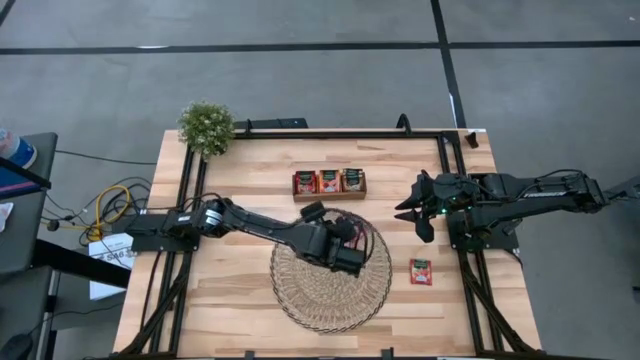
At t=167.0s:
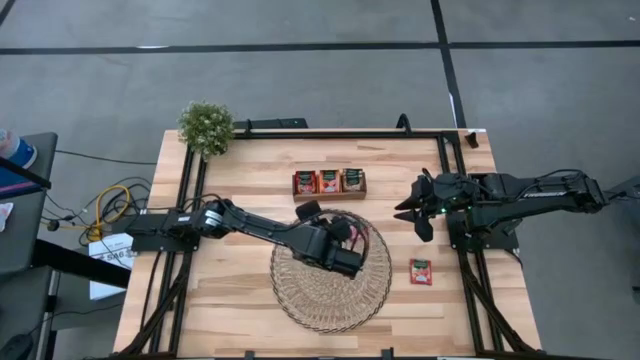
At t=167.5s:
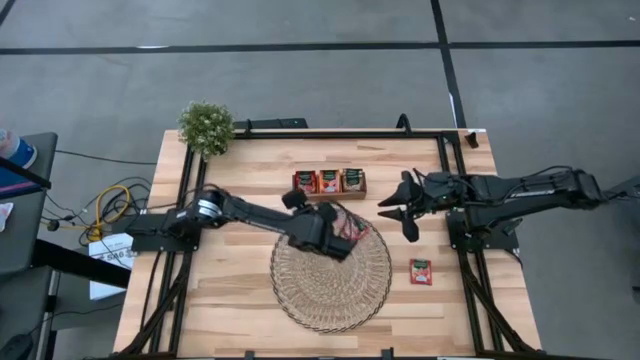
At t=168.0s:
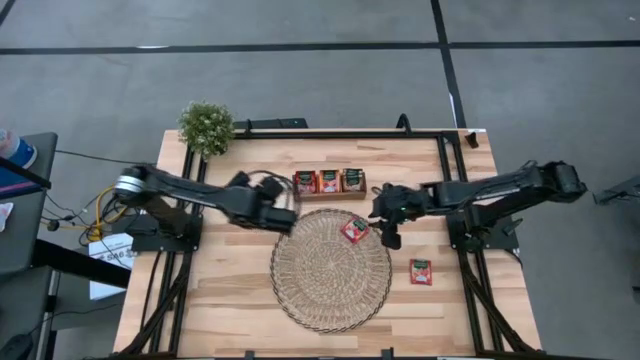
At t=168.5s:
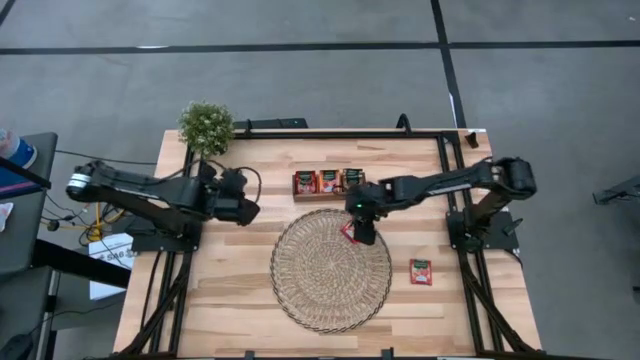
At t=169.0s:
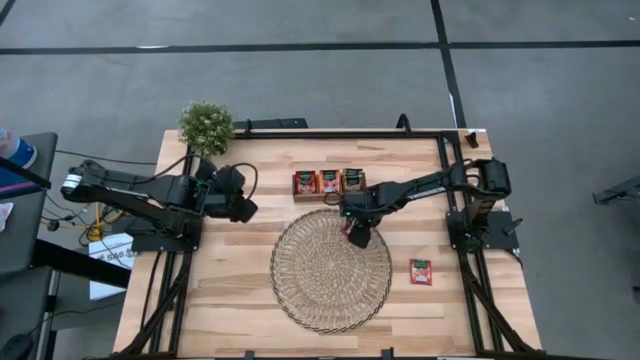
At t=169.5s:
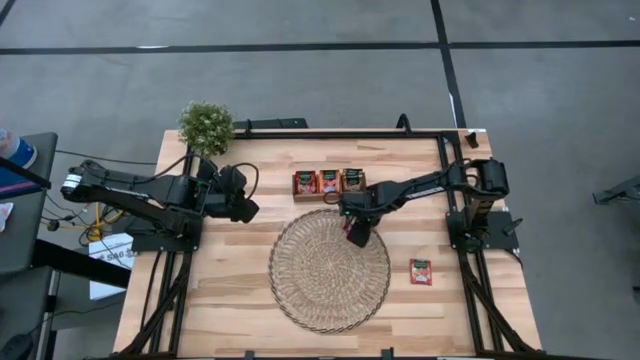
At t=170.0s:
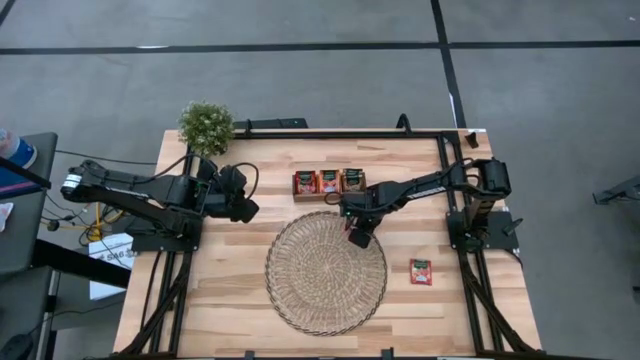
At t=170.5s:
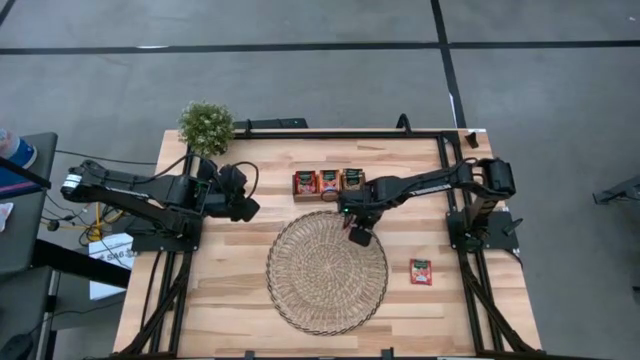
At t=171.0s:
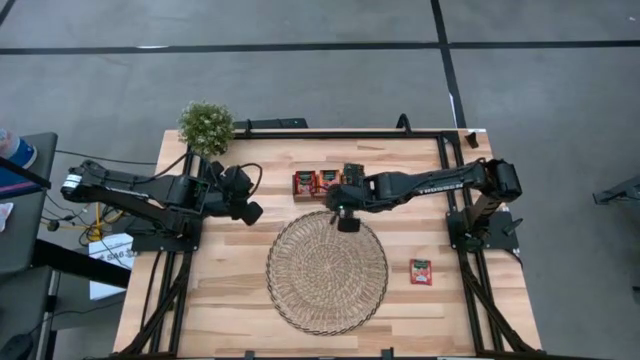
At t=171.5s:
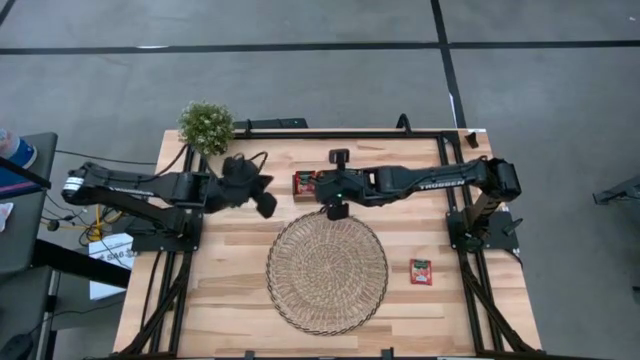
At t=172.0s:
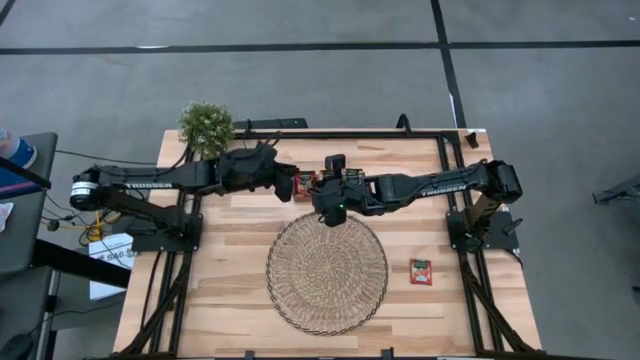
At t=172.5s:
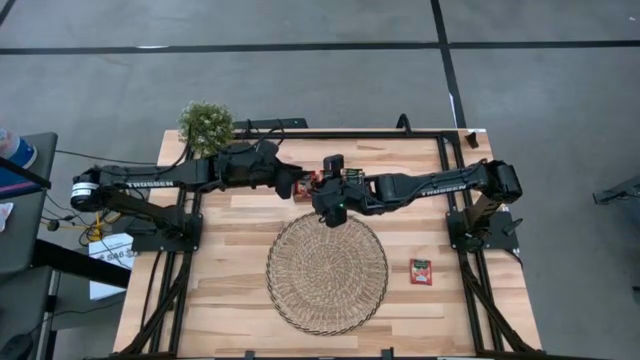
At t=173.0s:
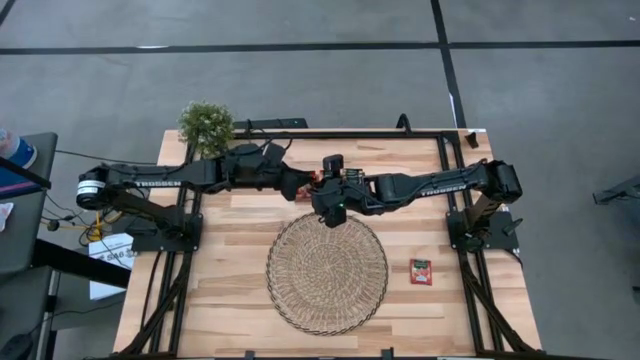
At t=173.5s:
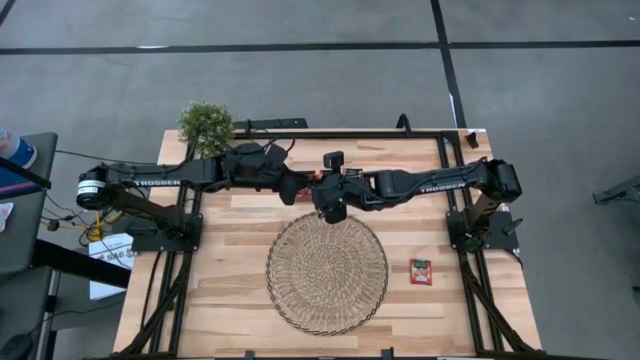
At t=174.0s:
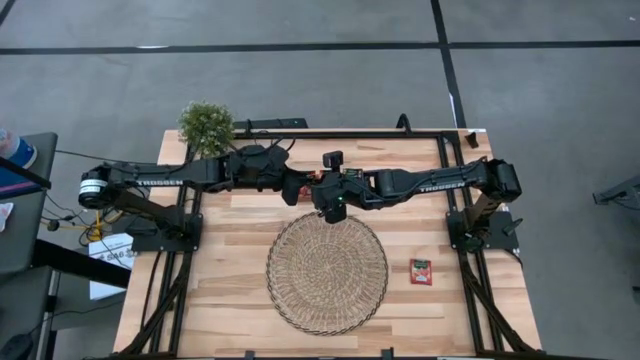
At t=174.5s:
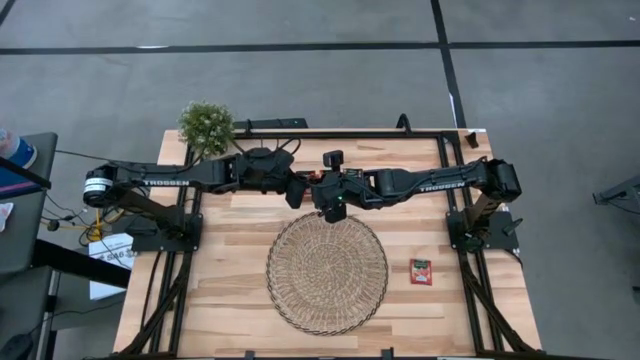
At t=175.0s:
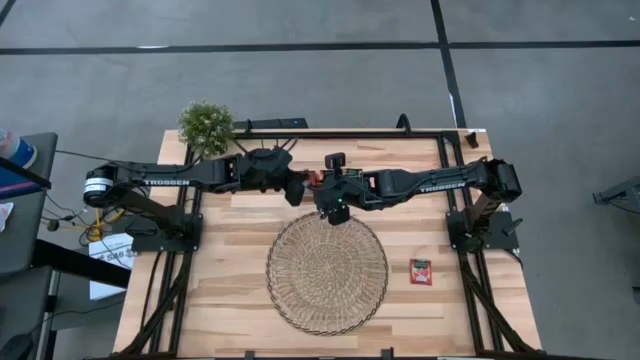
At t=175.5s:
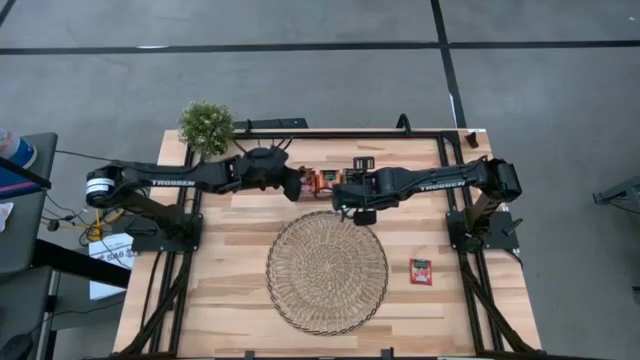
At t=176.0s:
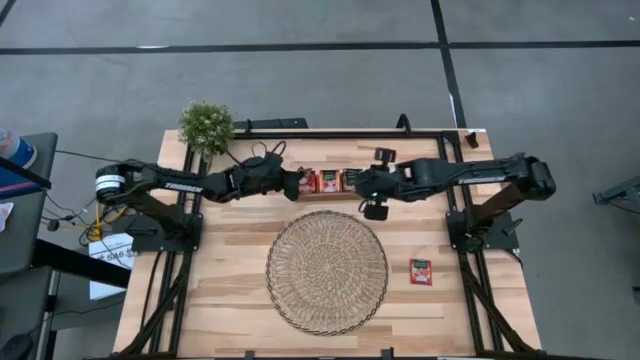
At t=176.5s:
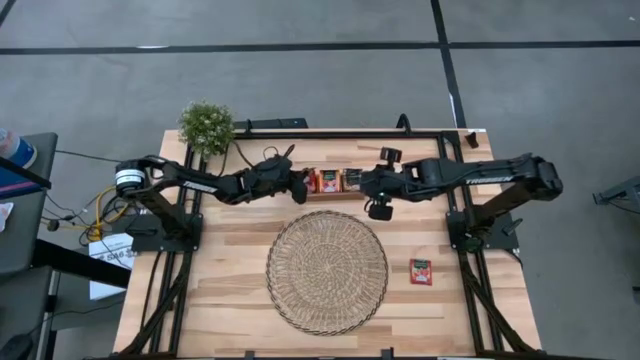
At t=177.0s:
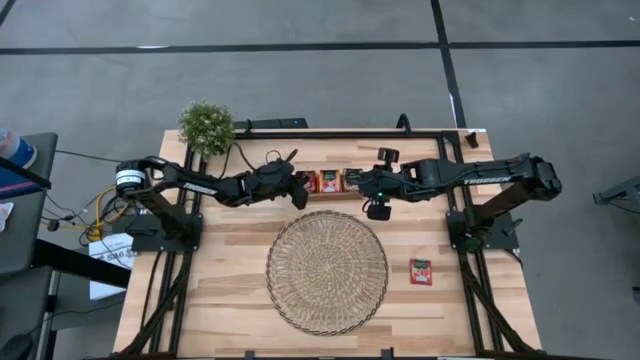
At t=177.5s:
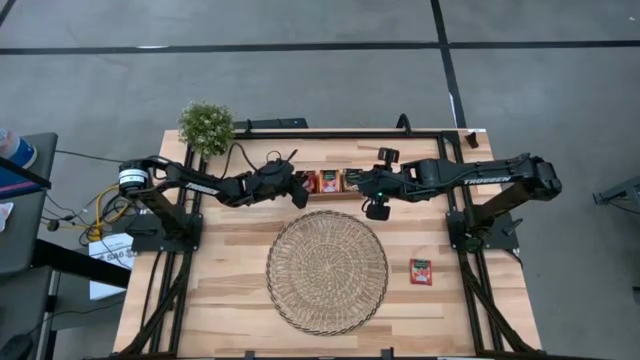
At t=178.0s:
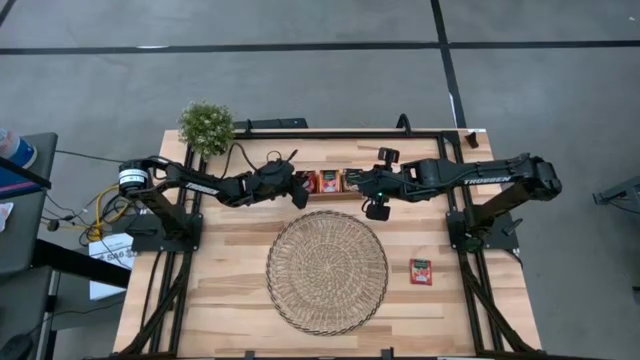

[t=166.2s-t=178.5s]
Task: Pick & Place Tea
Put the red tea bag into the wooden organizer

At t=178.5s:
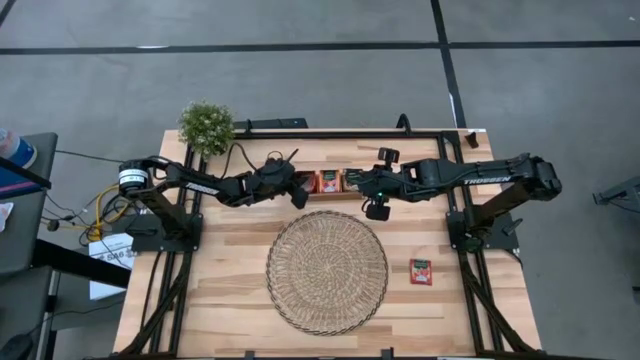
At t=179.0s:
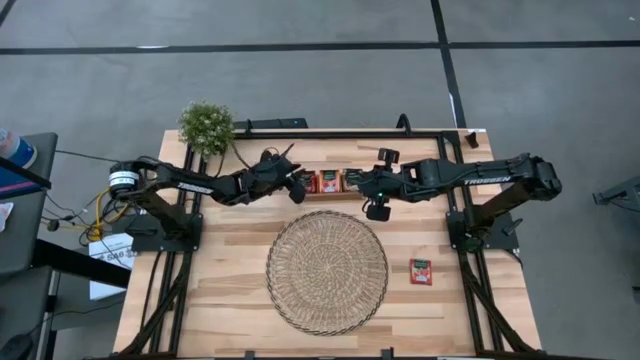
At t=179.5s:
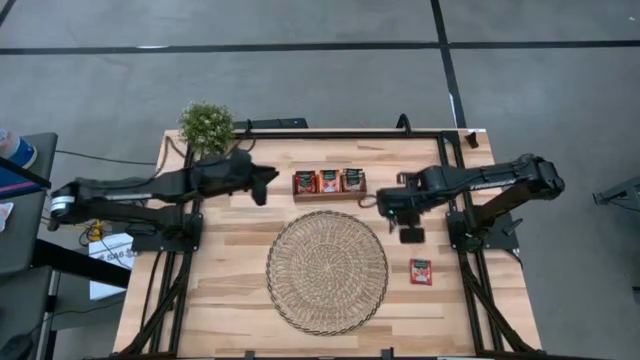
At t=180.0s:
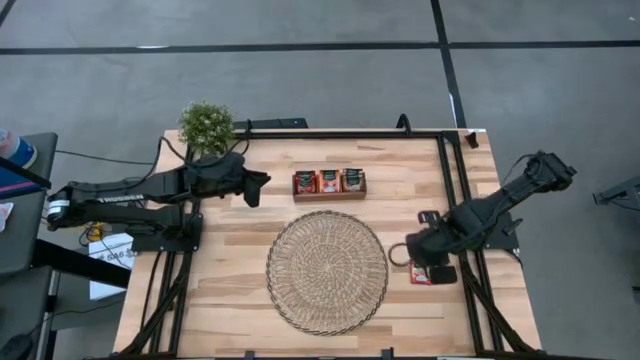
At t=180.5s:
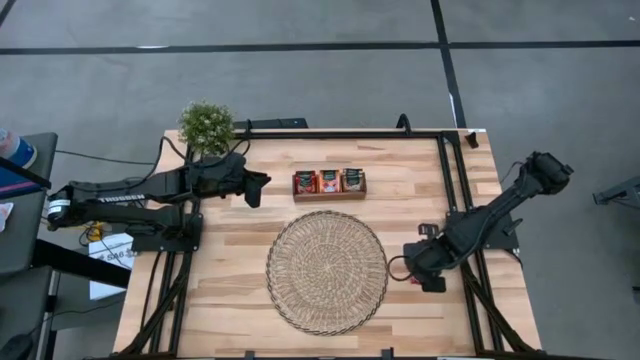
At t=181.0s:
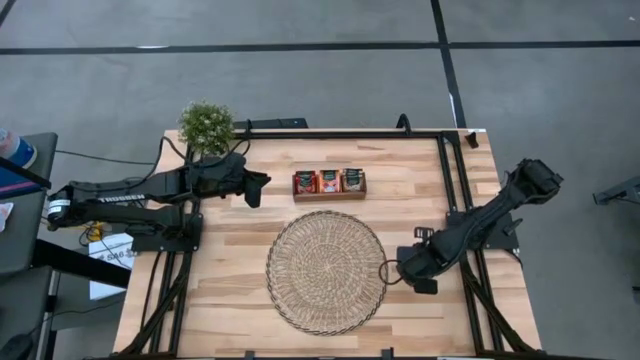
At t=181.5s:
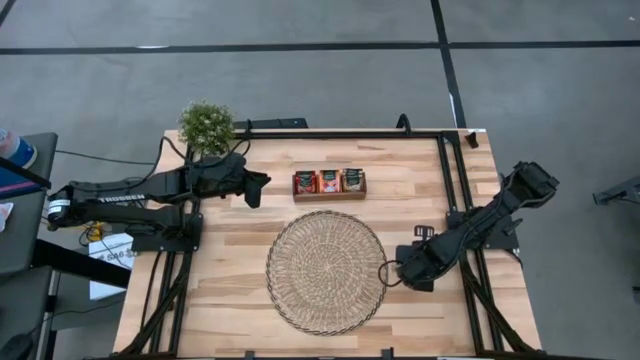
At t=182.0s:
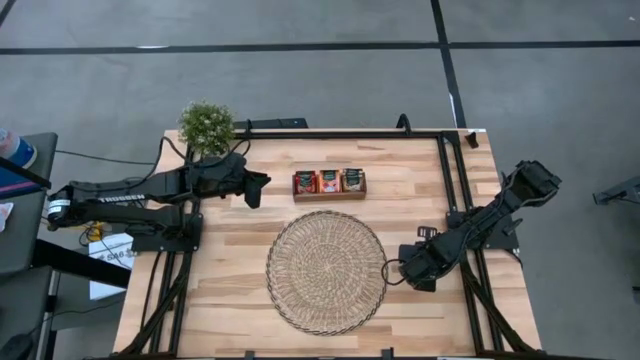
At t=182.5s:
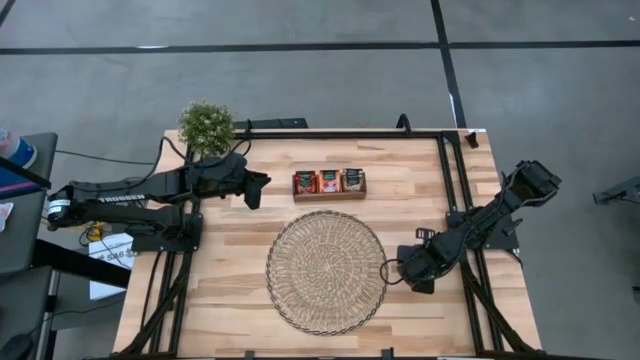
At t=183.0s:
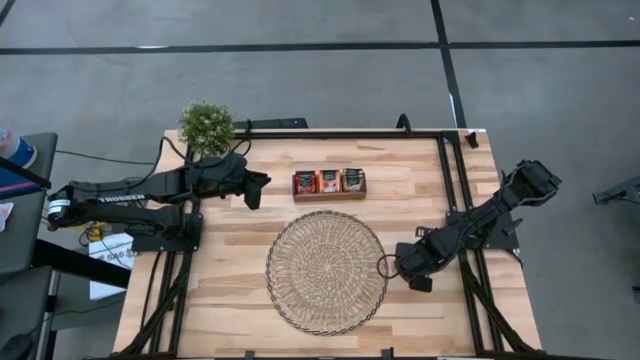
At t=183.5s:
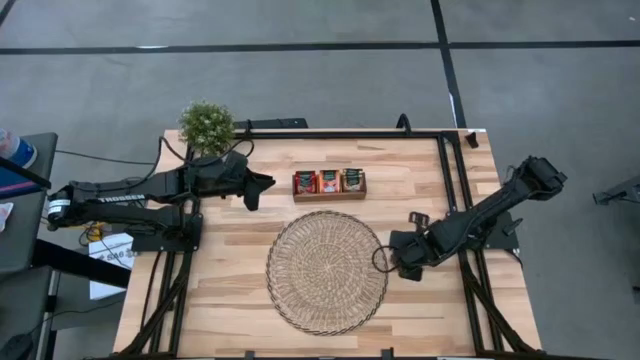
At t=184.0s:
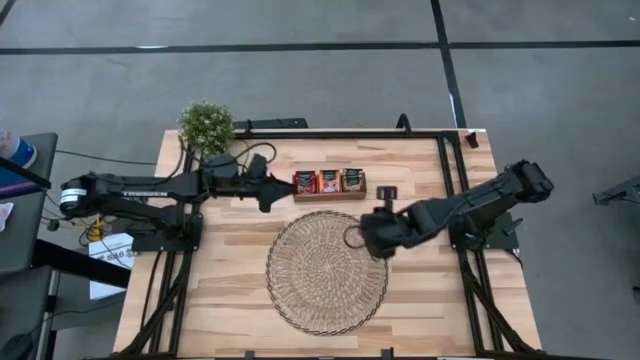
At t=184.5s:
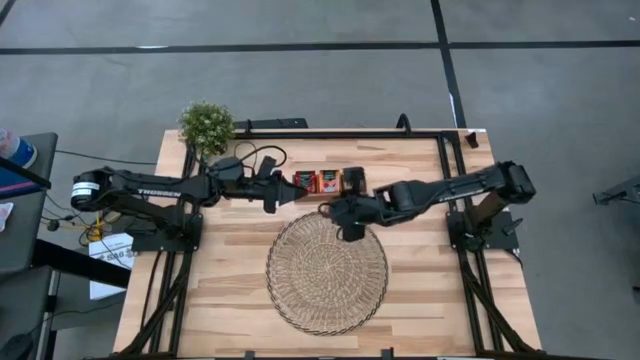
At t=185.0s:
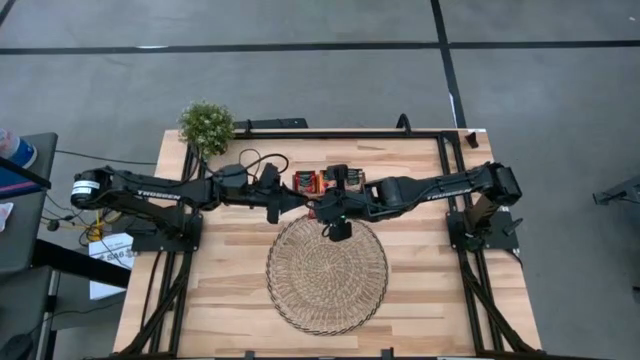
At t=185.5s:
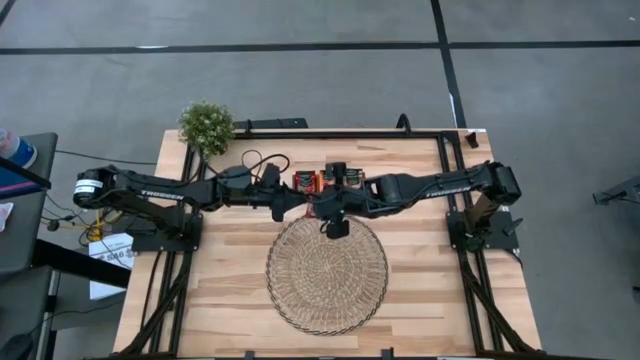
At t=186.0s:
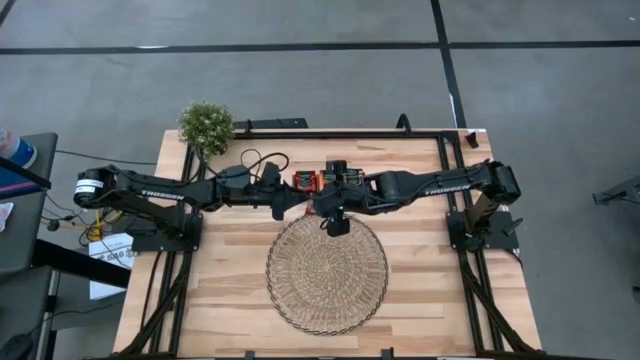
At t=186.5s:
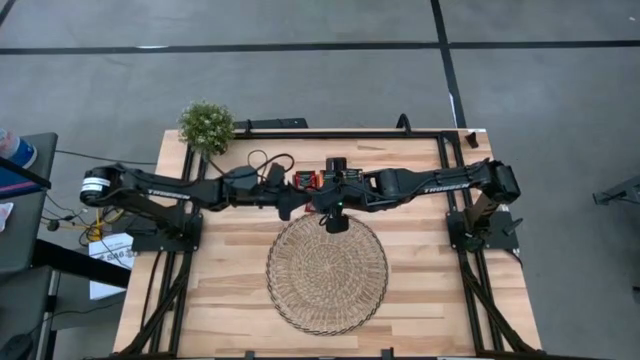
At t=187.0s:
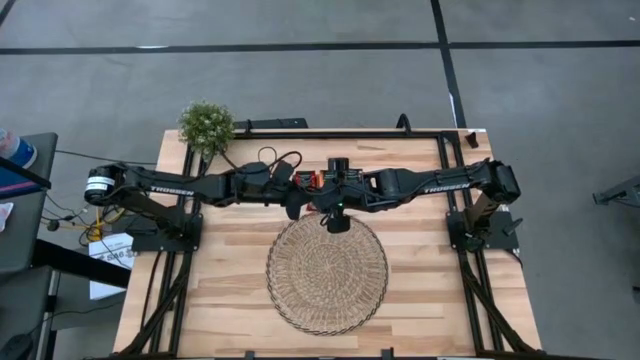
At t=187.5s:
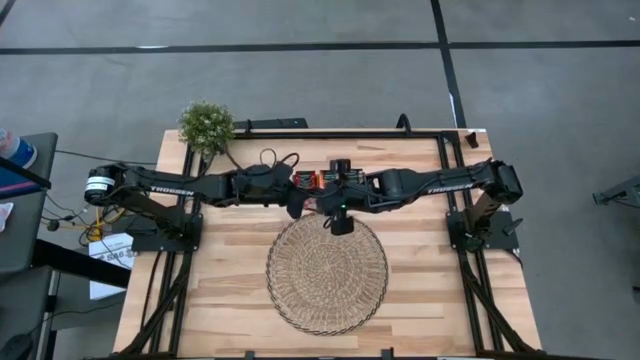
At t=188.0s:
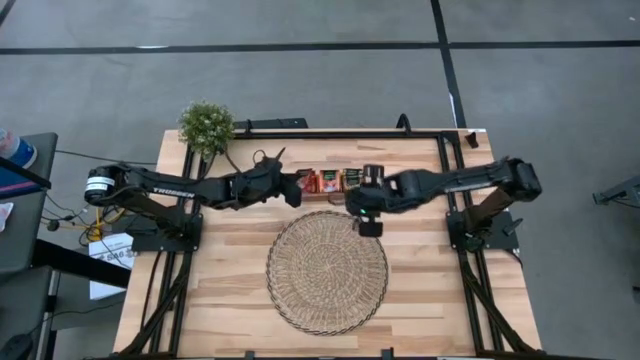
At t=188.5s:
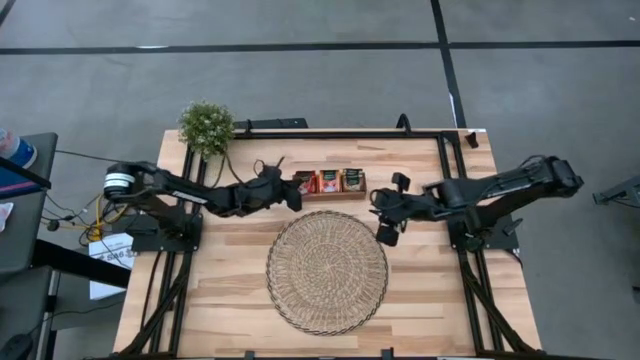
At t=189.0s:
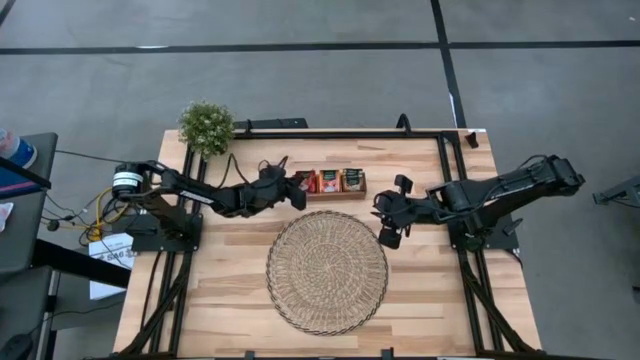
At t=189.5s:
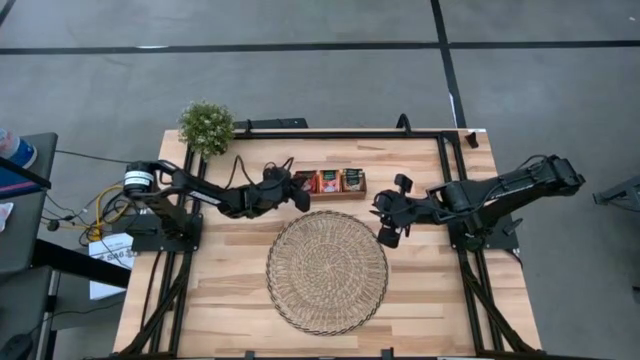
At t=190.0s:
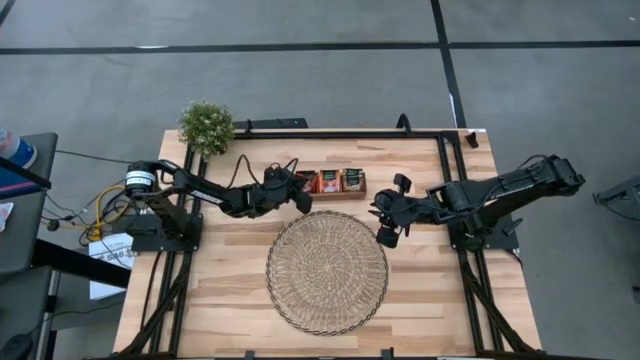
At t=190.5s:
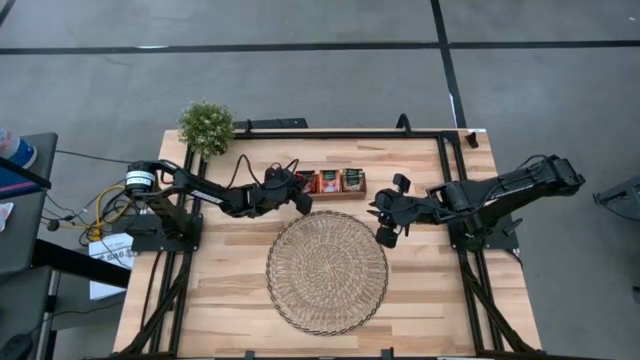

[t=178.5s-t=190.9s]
Put the red tea bag into the wooden organizer
